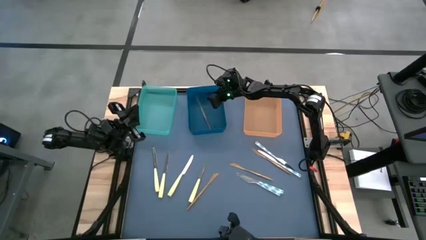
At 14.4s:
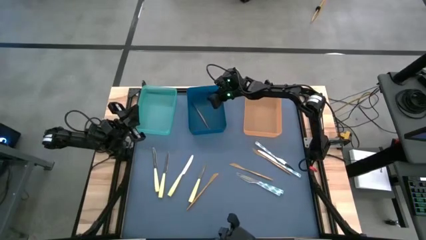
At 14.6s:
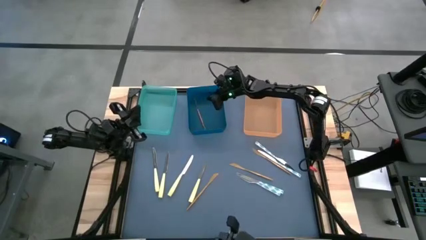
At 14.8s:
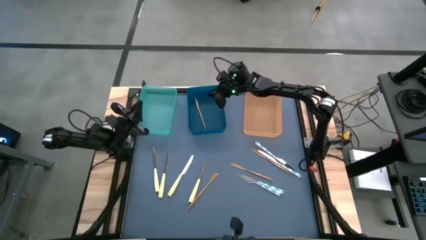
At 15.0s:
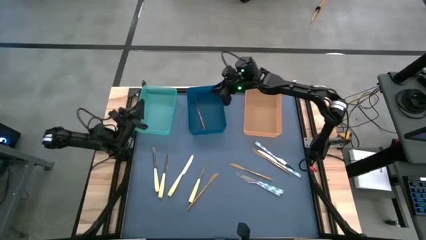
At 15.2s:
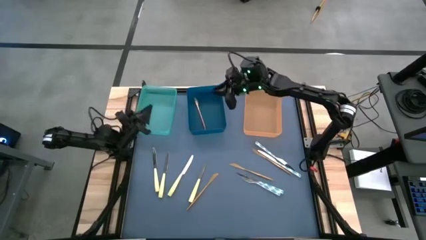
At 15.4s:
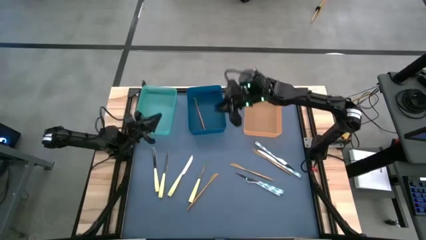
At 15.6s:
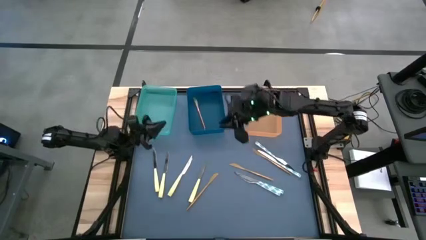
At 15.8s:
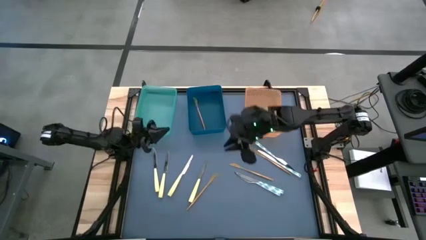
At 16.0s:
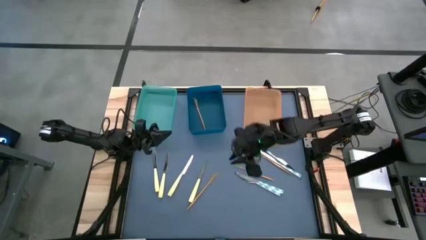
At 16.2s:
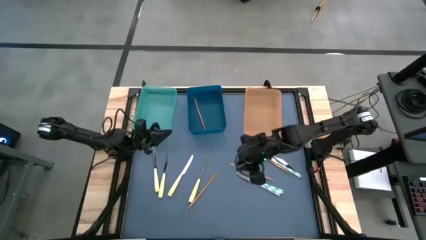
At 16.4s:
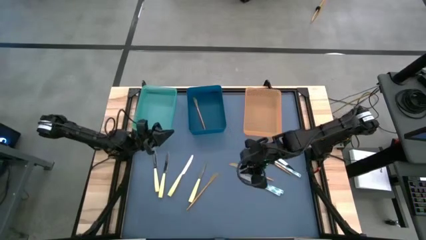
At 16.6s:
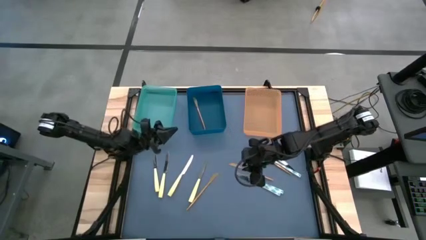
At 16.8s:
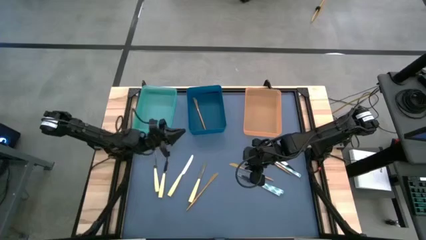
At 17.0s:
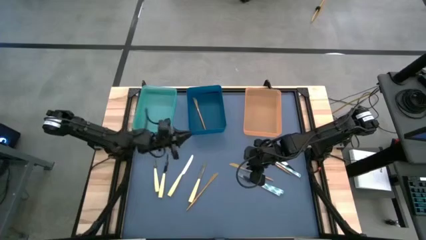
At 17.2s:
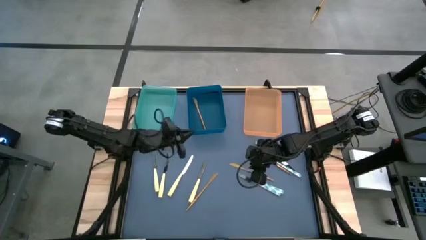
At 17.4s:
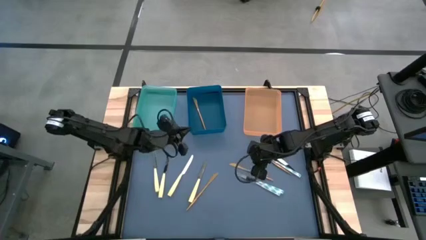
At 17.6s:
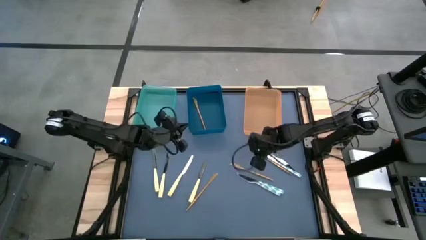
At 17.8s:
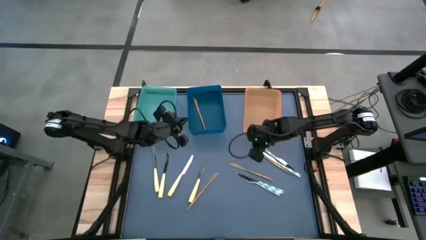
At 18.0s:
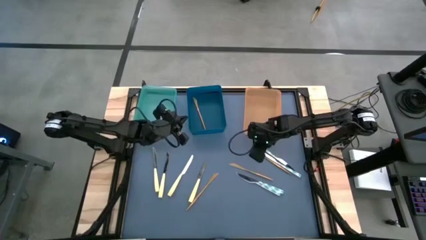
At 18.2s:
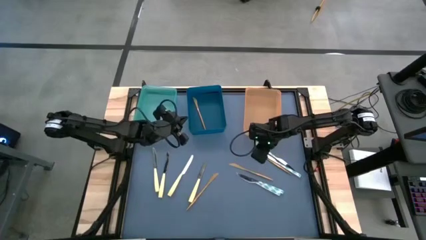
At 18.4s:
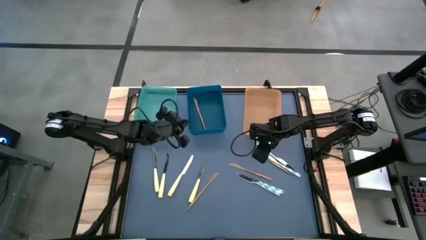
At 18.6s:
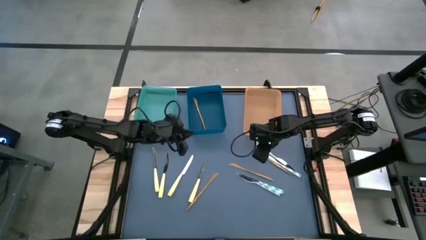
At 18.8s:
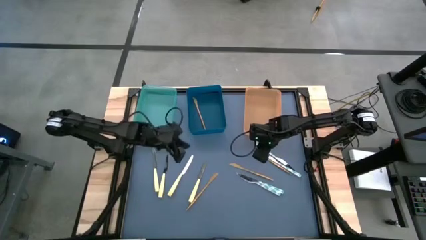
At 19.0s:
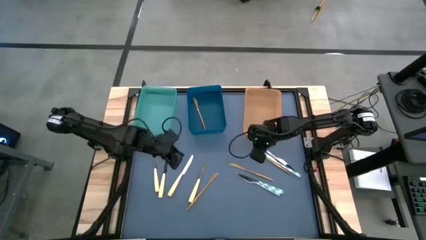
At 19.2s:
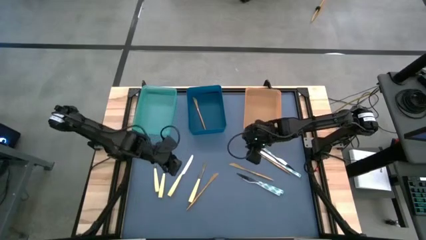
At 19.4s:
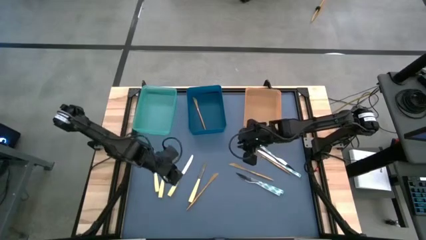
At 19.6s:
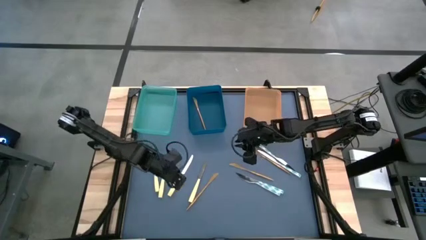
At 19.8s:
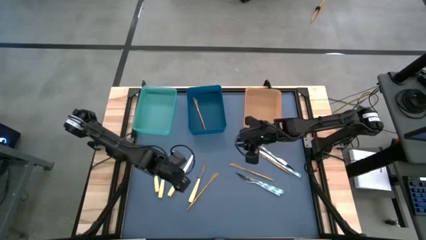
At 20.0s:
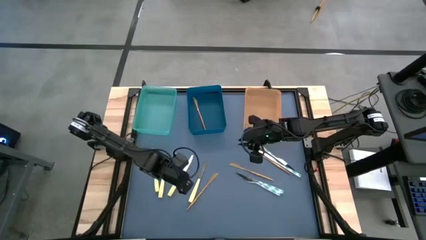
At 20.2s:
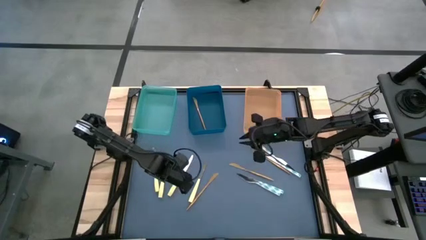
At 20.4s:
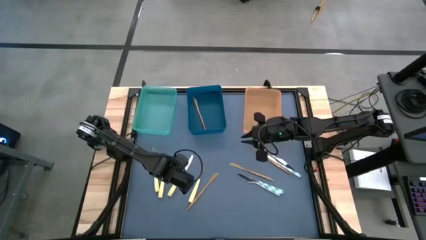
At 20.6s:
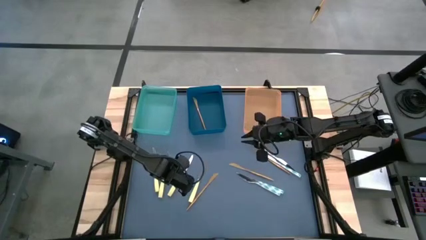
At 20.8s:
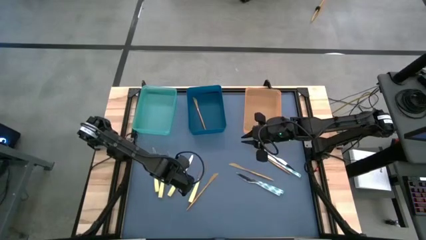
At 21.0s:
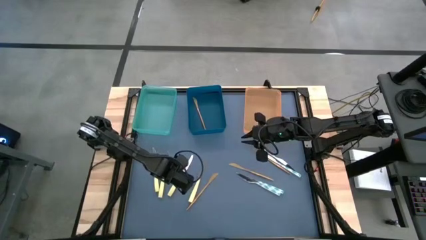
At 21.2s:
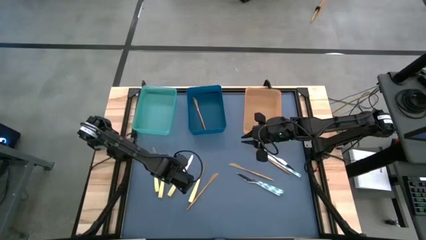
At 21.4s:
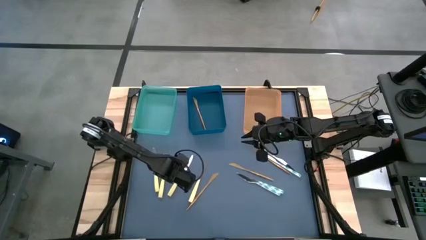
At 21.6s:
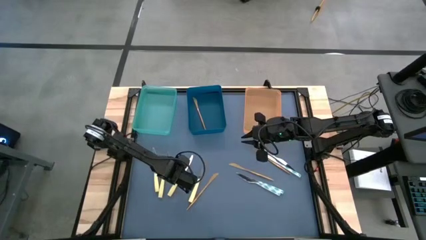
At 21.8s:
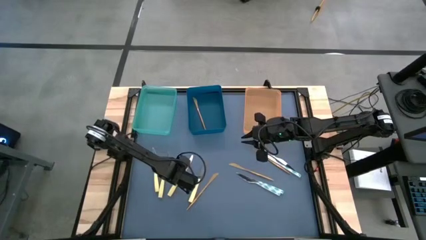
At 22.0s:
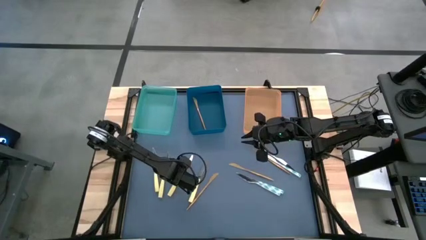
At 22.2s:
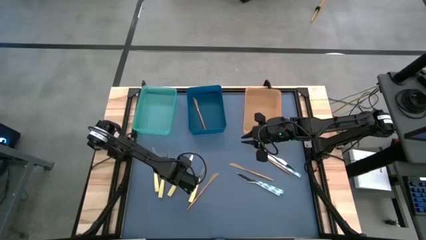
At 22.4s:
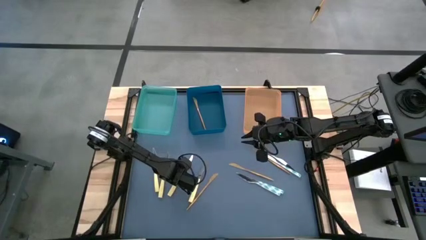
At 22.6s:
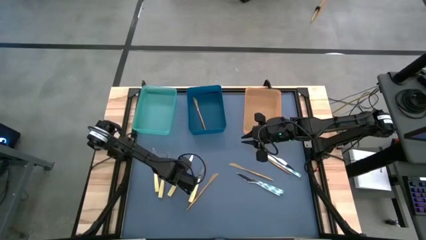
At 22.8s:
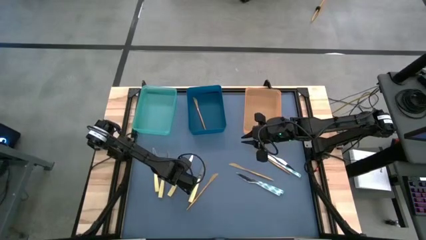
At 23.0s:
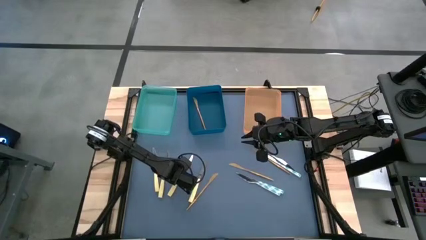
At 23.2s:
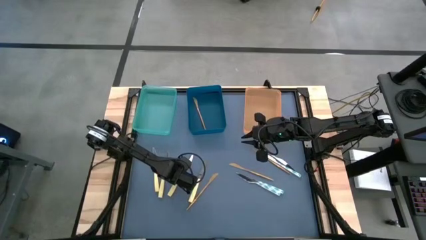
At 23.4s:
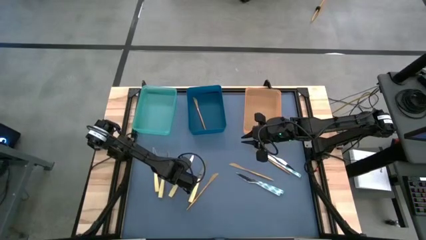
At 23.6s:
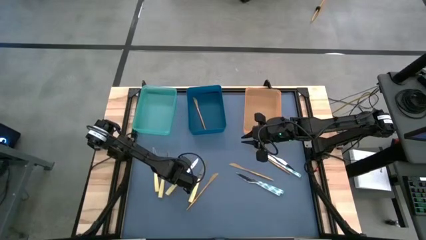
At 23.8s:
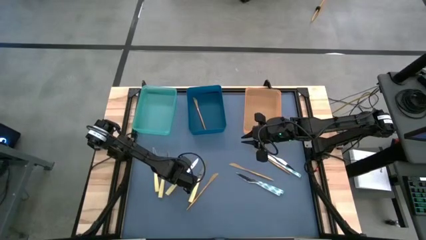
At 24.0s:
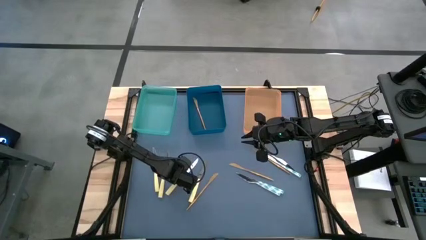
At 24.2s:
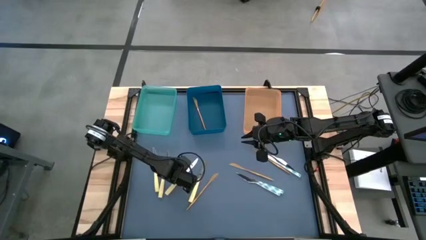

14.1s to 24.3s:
Task: Sort silverware by color (type)
Put the yellow table knife into the green bin
